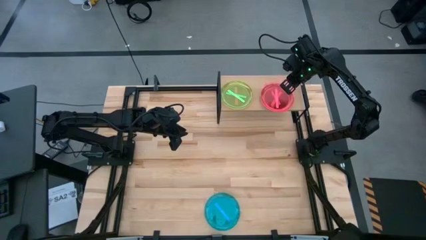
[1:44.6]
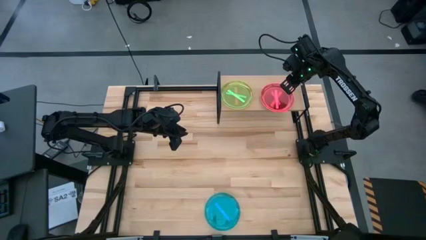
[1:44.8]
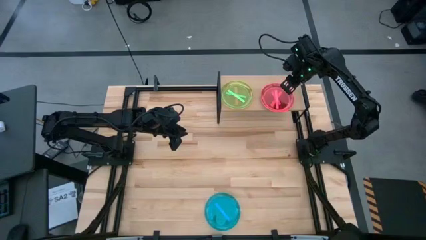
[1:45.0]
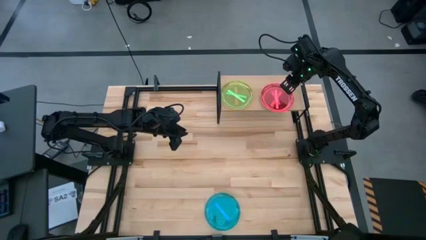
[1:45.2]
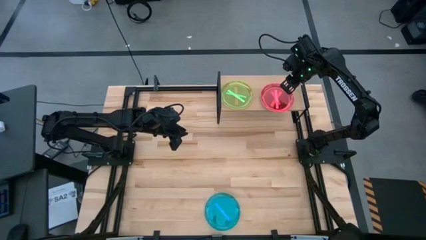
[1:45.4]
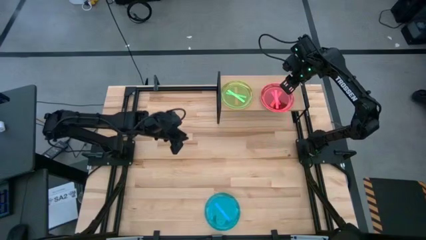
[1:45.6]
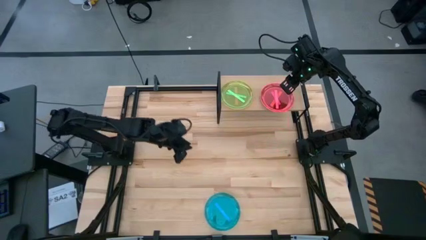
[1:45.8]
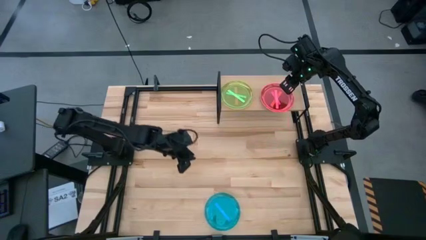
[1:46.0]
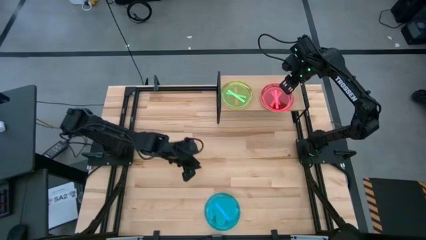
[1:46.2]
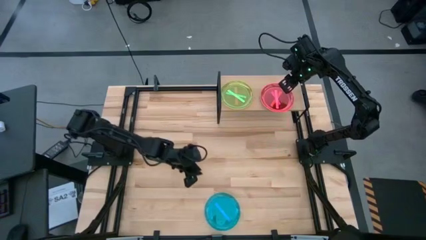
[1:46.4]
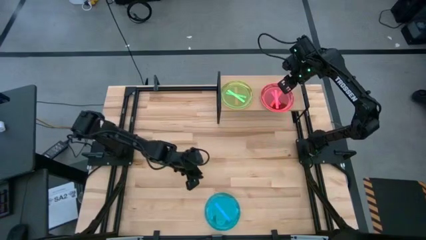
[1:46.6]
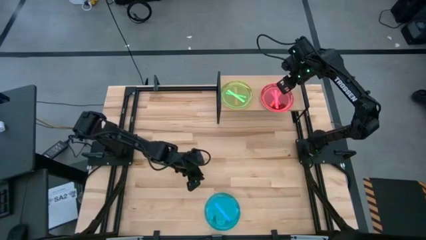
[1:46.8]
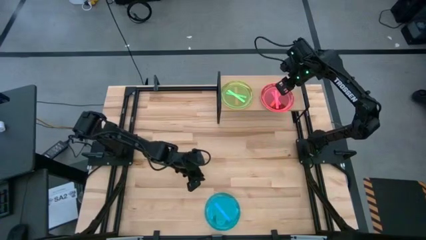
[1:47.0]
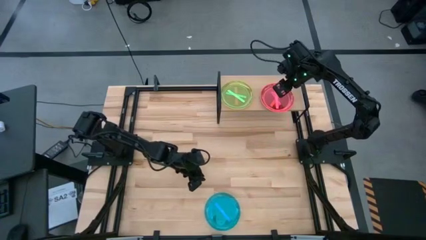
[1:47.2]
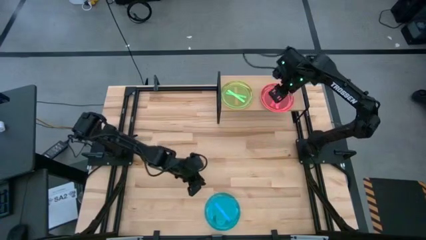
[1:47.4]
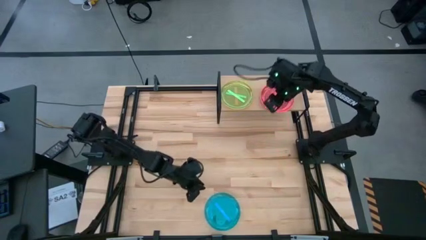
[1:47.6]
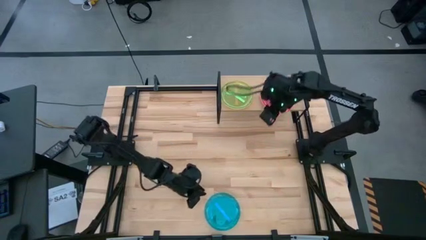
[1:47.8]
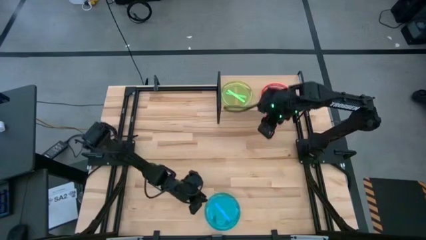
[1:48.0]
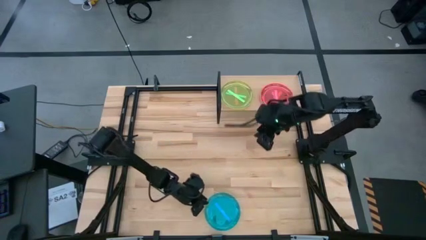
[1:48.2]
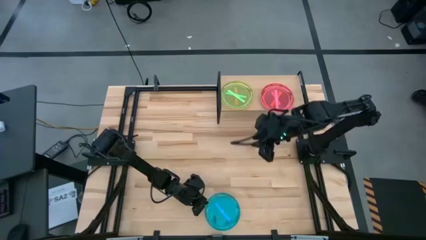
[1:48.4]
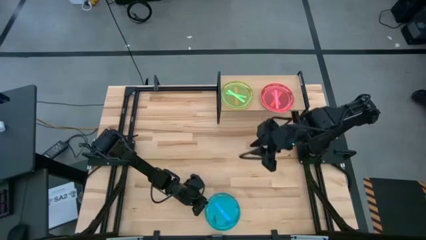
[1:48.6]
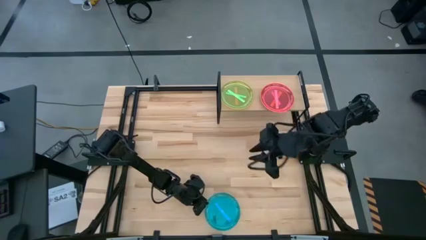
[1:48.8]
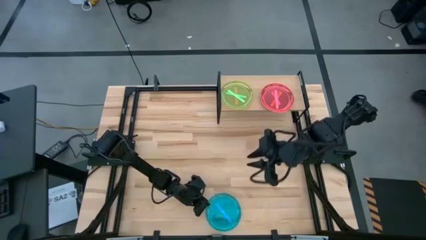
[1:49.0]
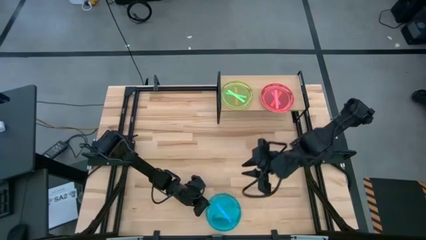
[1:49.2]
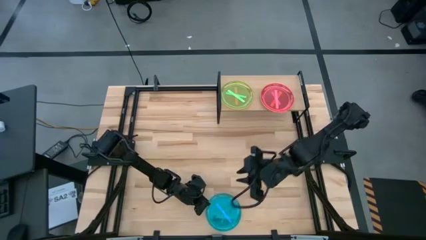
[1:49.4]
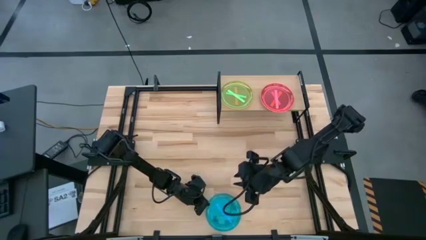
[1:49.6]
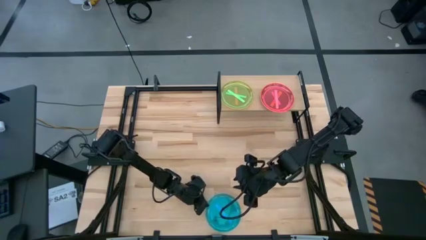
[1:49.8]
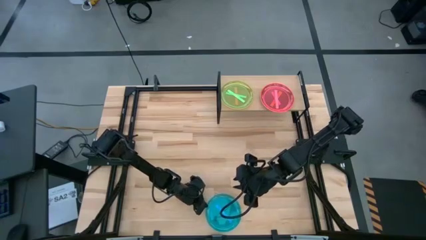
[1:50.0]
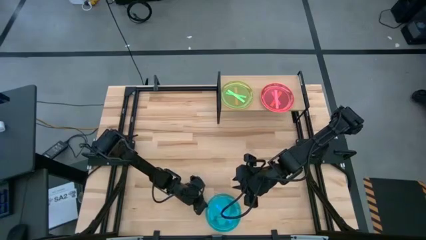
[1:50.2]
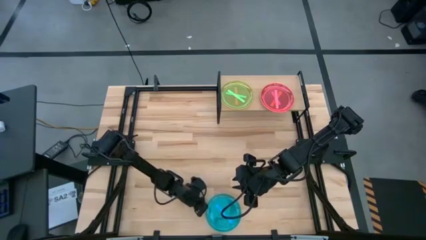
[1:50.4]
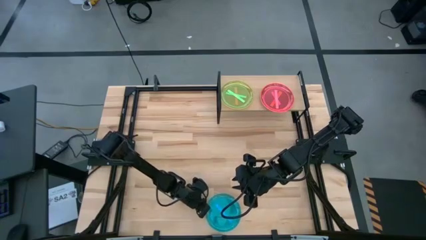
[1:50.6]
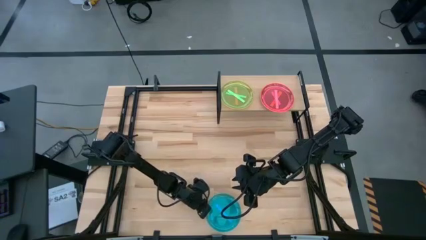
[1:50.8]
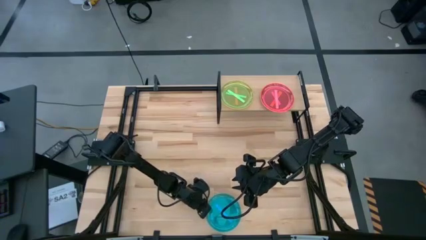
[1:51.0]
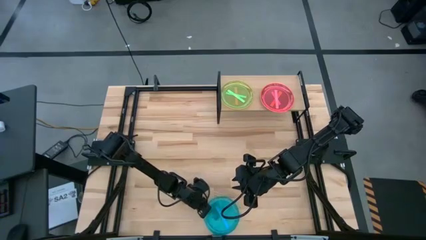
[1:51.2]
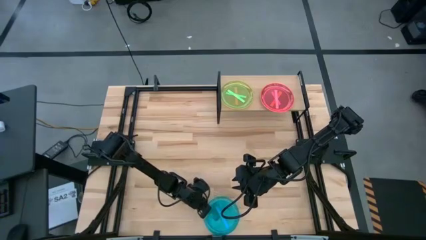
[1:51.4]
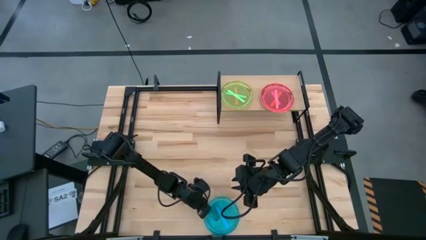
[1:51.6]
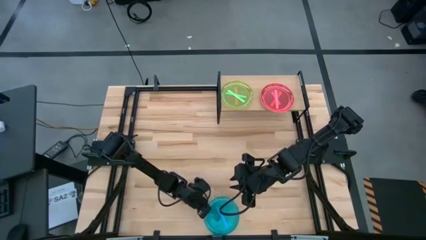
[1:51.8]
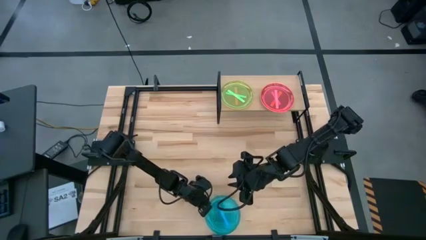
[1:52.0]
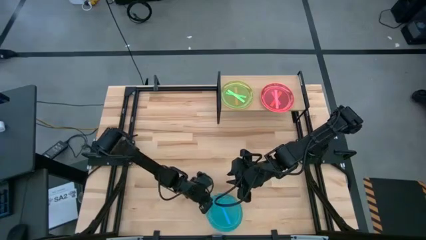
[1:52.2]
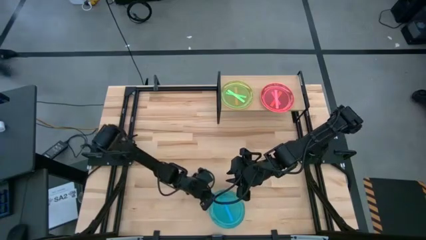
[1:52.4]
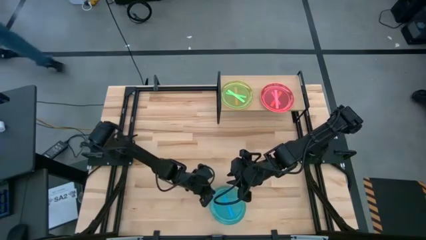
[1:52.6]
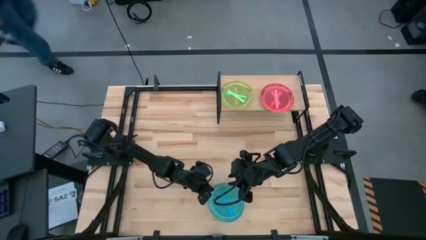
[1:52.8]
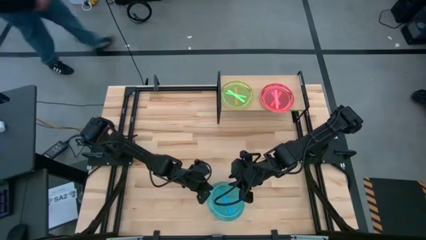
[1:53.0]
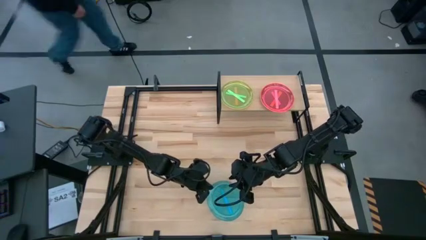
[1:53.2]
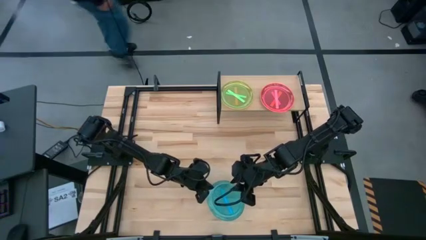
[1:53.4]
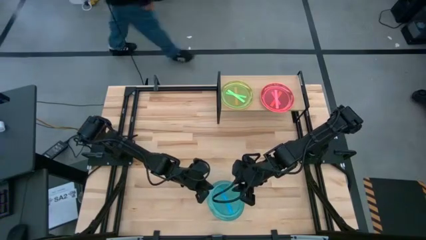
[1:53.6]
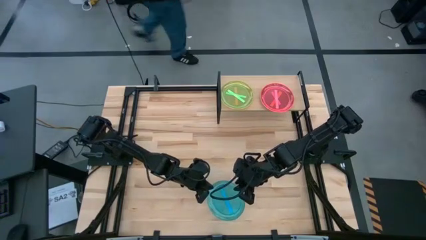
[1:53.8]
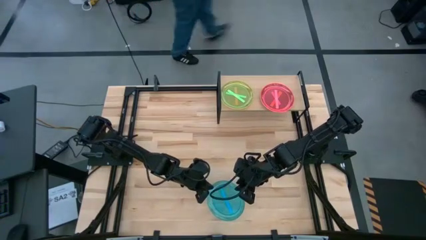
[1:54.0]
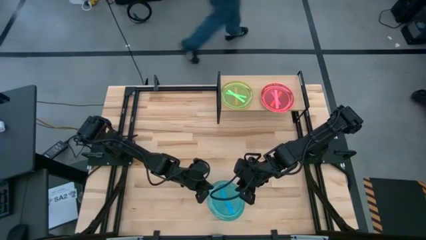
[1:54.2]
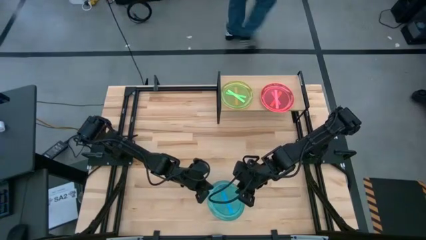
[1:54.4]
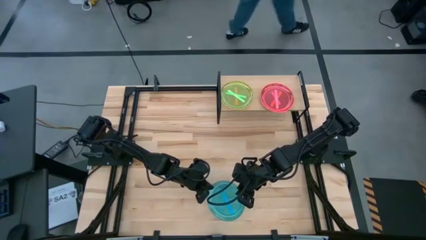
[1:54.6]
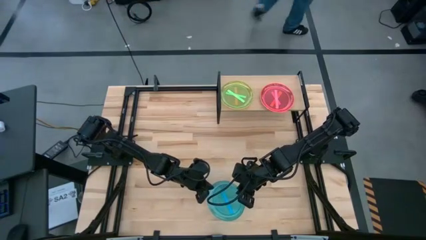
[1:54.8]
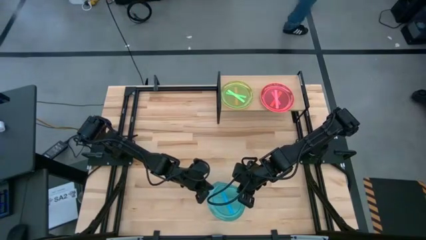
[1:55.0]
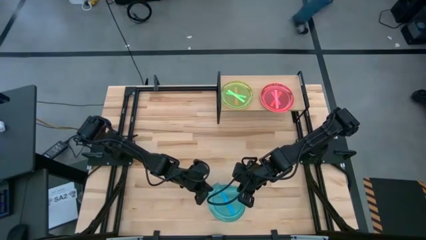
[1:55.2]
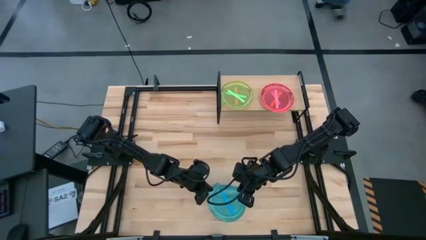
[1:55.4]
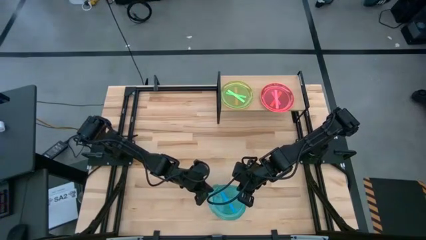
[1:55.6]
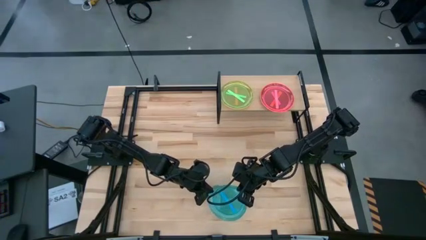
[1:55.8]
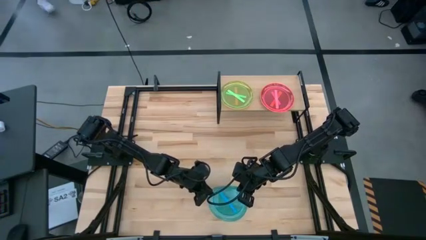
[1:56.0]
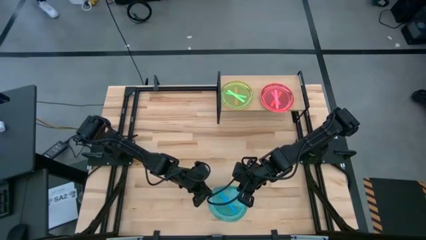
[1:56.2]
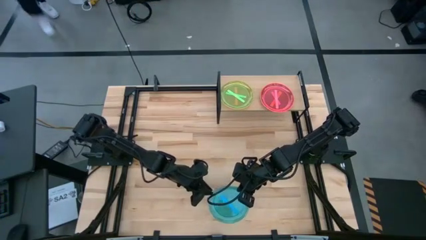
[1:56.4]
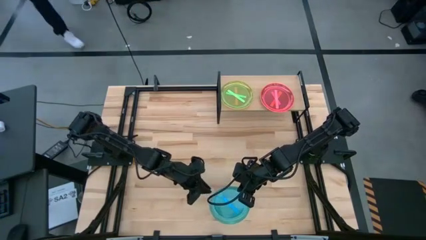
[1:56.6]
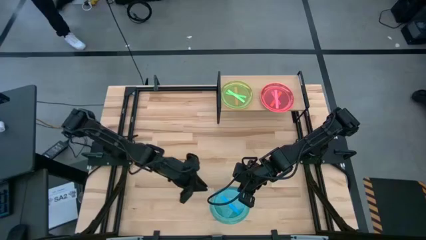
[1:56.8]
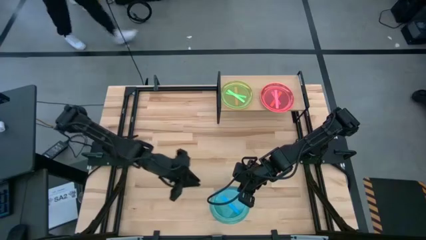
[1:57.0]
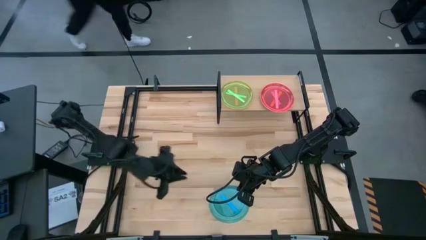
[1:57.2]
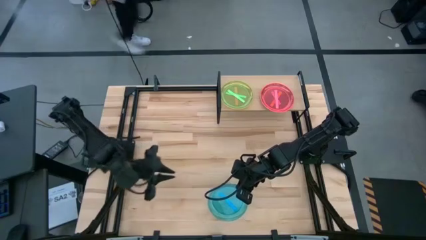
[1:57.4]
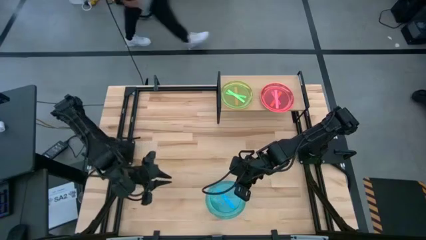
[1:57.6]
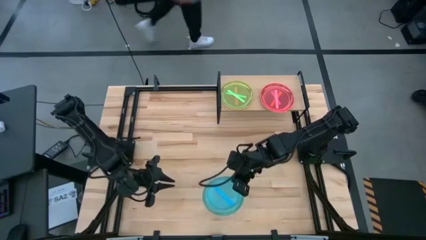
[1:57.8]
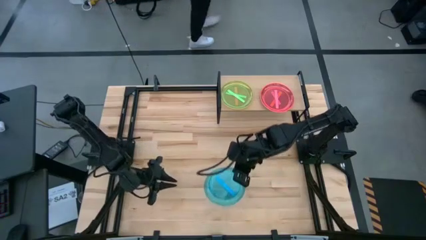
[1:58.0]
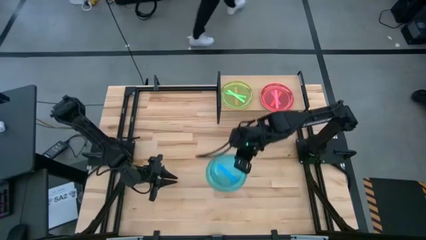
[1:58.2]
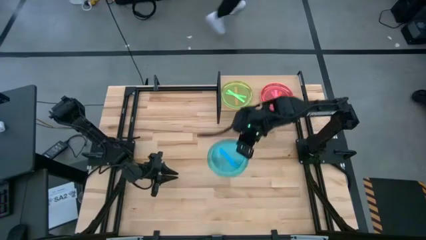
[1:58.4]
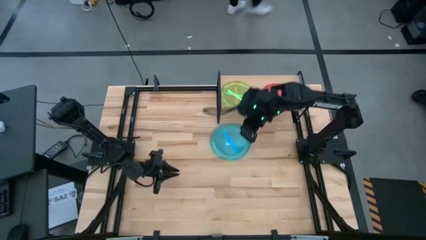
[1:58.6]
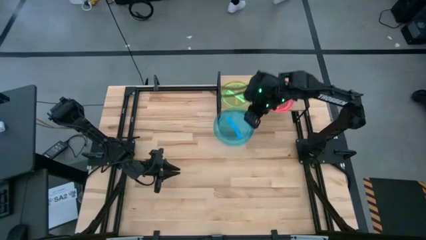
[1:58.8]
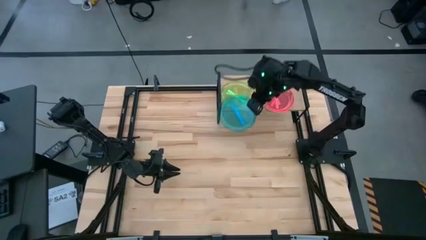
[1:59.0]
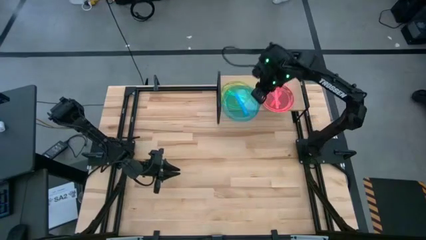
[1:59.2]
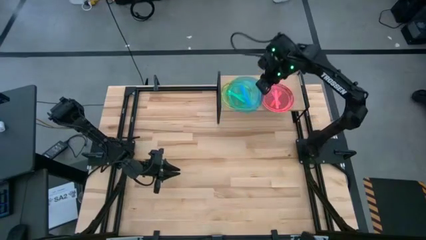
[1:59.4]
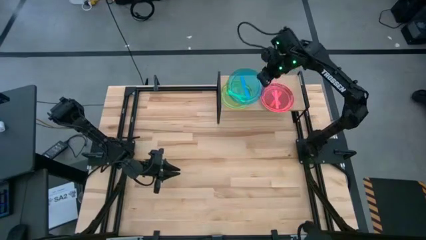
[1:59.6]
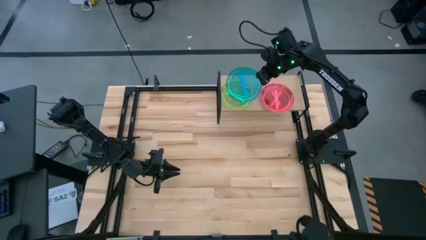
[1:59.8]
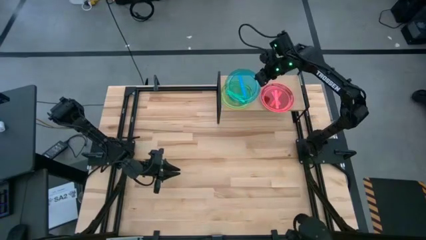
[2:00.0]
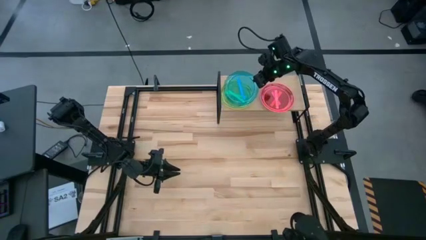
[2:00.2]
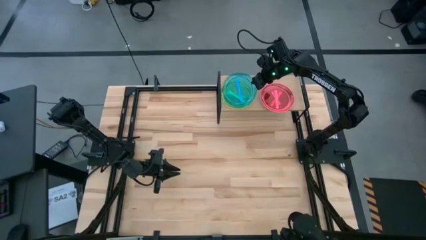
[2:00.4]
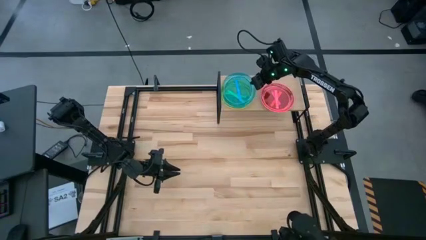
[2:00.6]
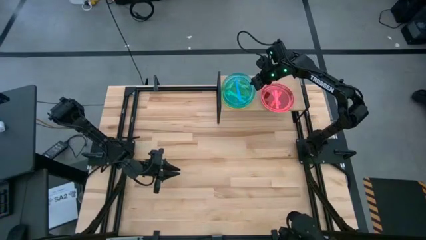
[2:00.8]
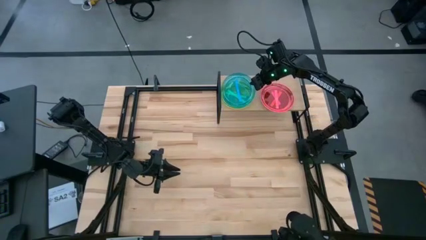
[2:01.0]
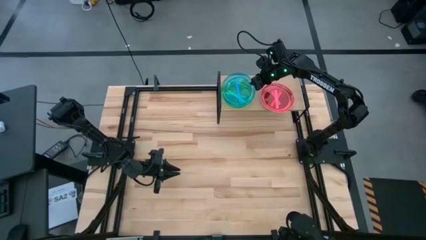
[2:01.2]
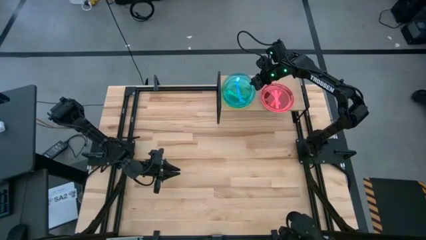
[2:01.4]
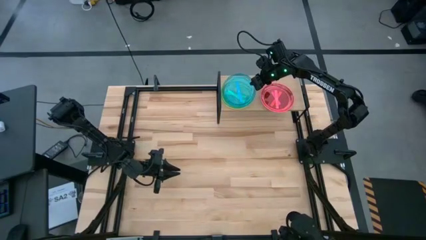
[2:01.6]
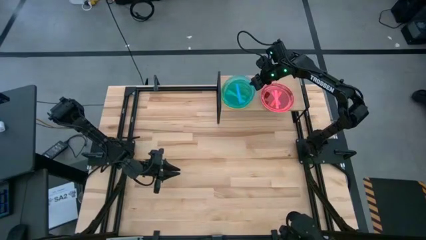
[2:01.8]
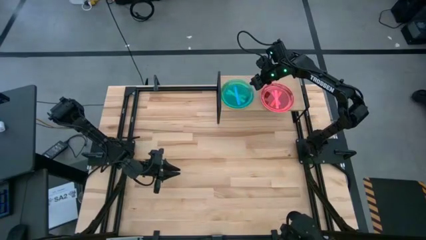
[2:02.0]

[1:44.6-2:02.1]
Task: Place and stack plates onto a shelf
Stack the blue plate on top of the green plate on the shelf
